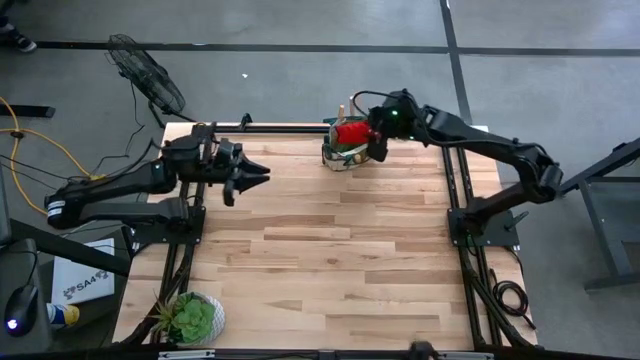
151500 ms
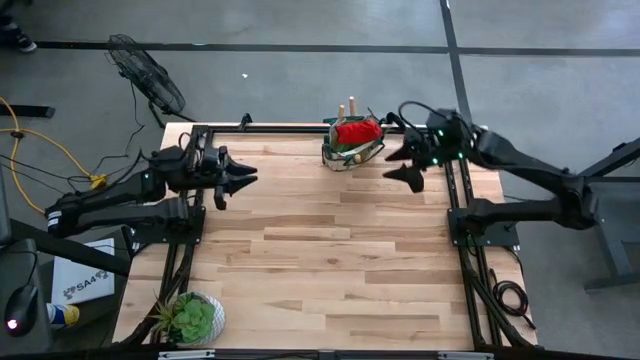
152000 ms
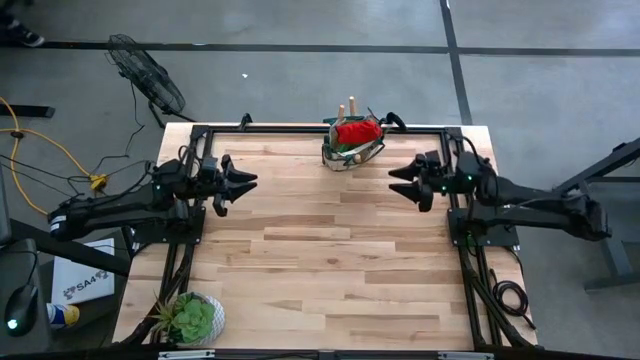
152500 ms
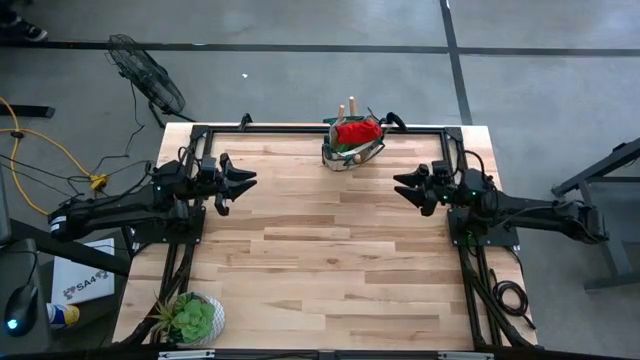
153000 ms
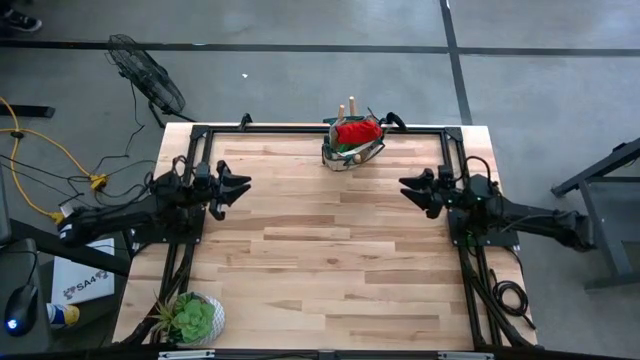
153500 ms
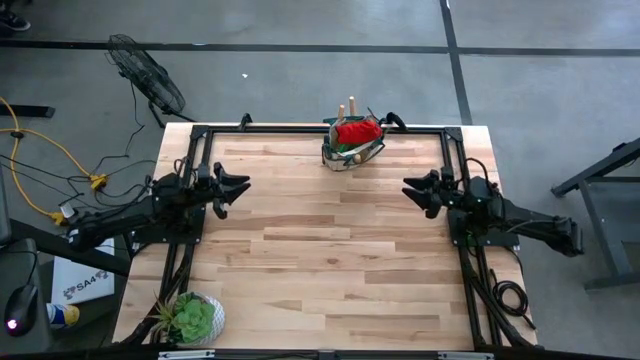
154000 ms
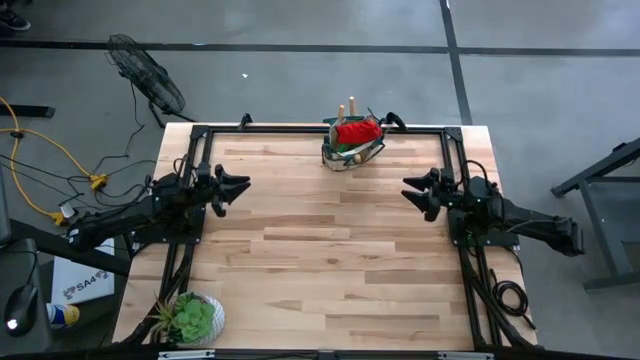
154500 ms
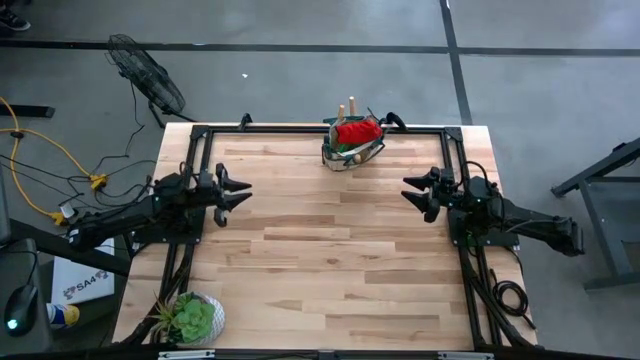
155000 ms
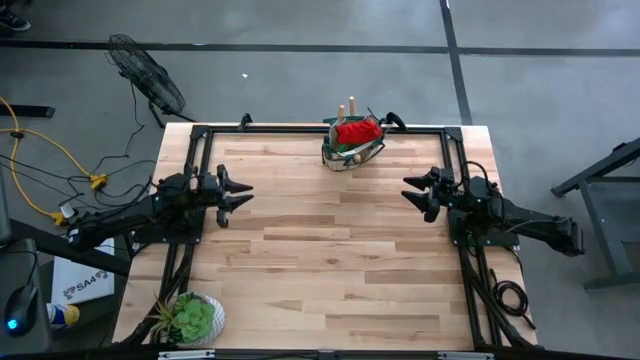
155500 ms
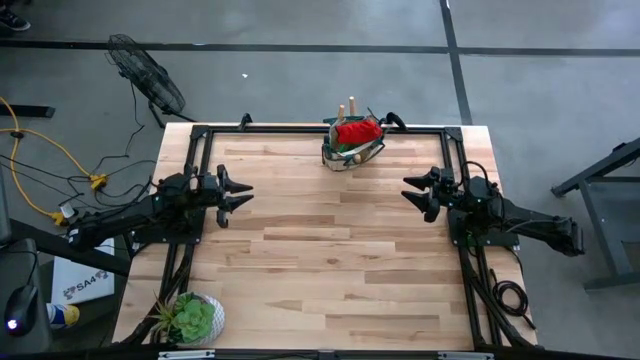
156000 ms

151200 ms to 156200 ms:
Task: Pick & Place Garden tools in Gardening bag
Return to Home Position

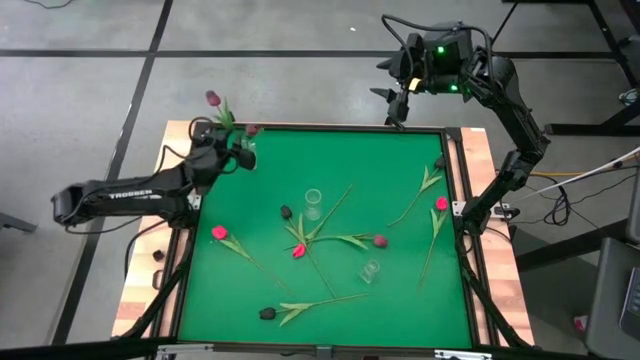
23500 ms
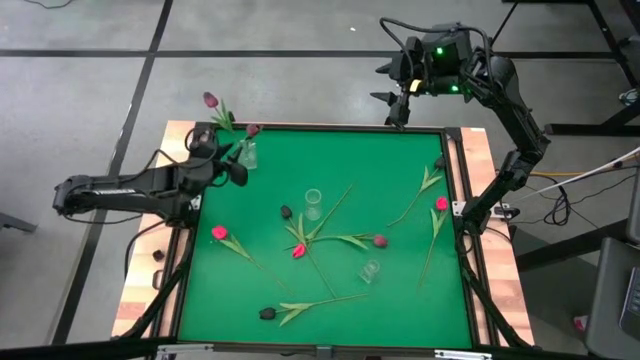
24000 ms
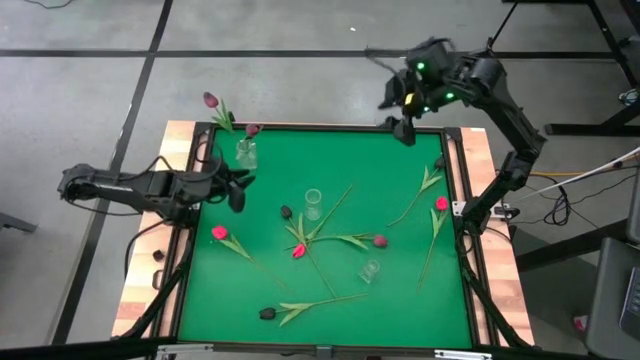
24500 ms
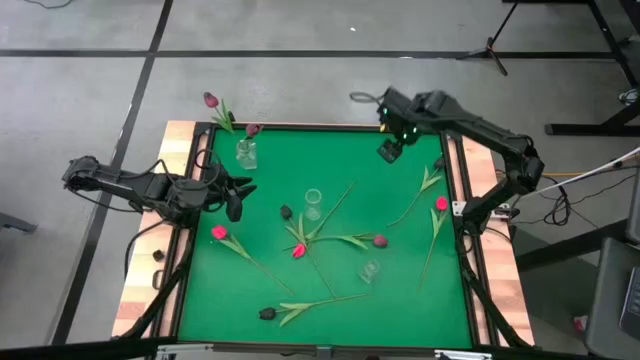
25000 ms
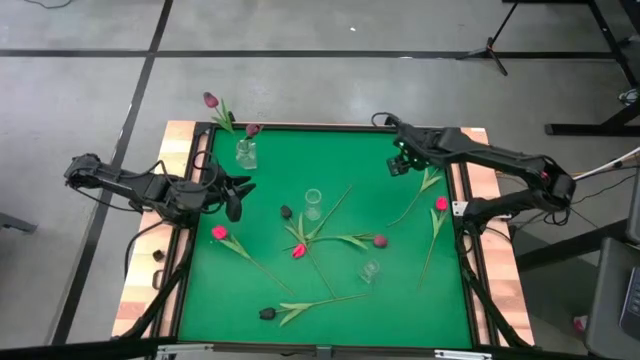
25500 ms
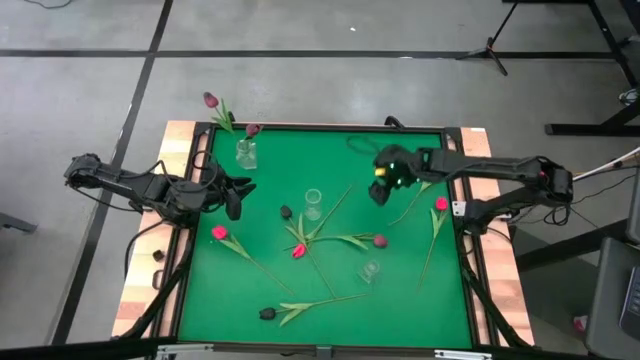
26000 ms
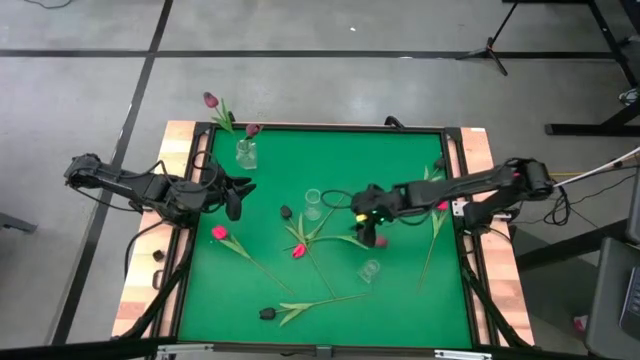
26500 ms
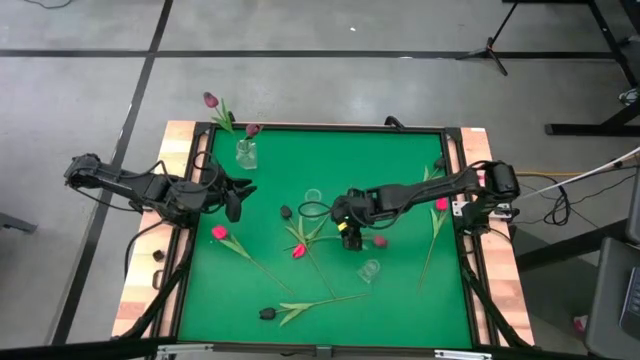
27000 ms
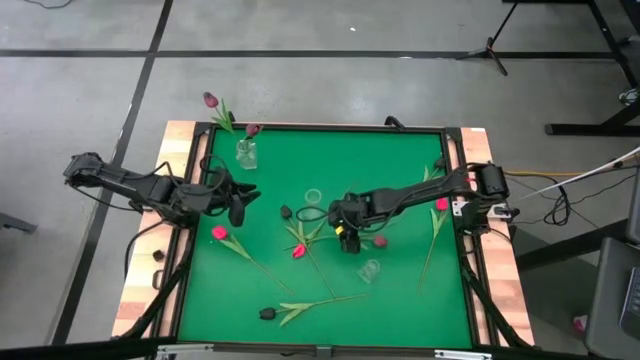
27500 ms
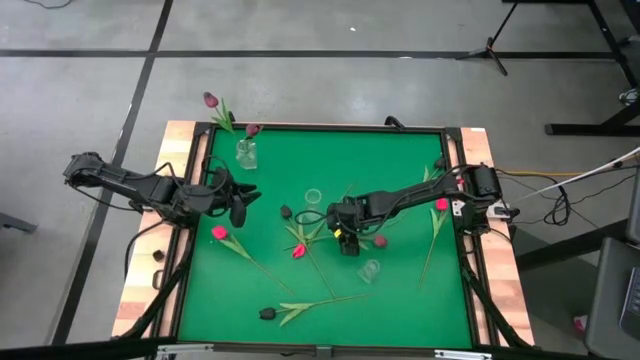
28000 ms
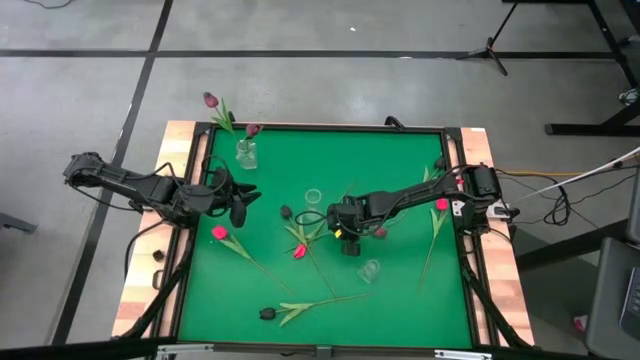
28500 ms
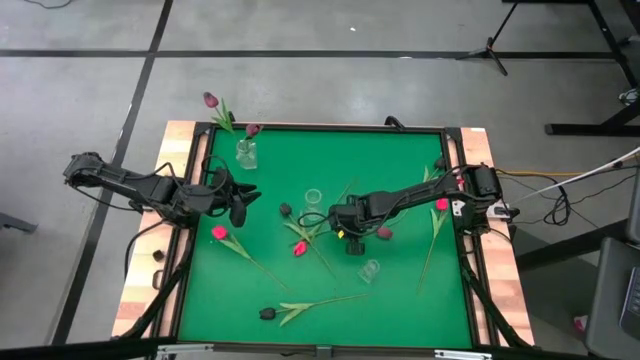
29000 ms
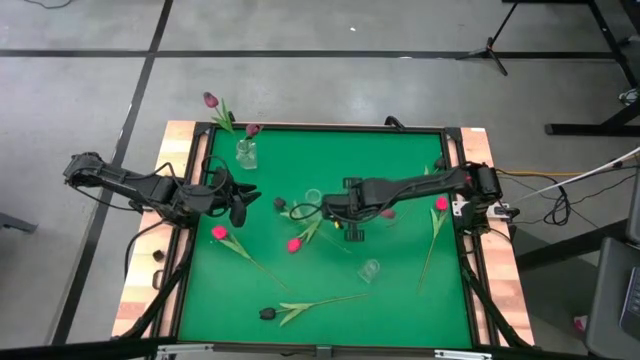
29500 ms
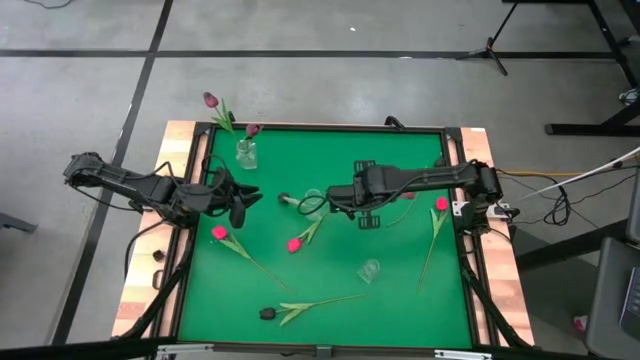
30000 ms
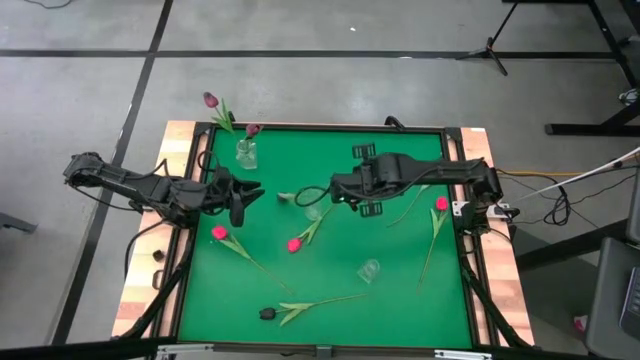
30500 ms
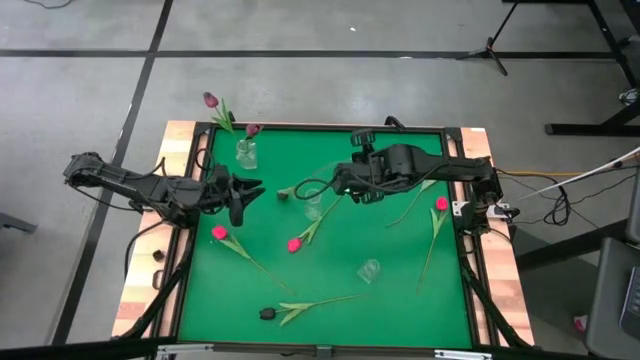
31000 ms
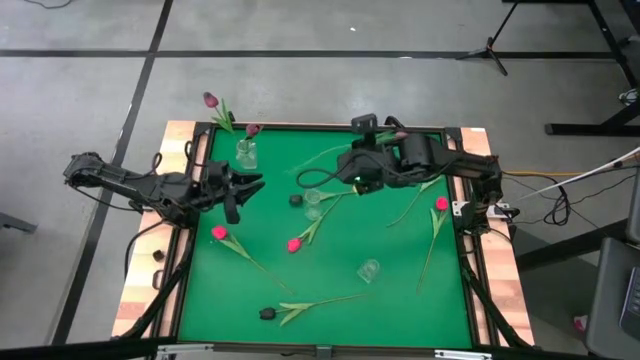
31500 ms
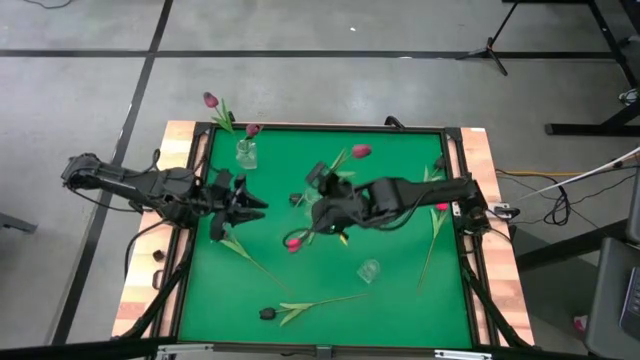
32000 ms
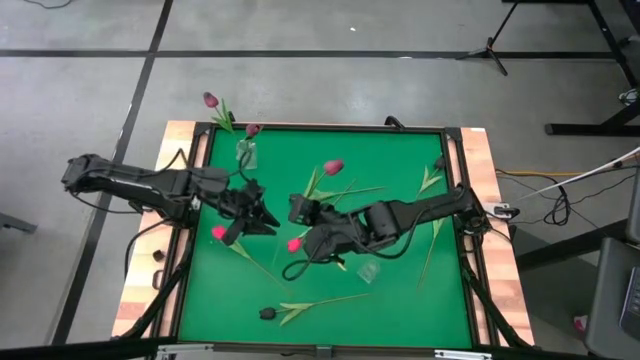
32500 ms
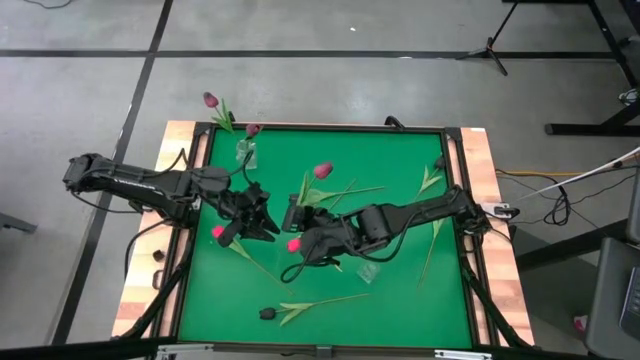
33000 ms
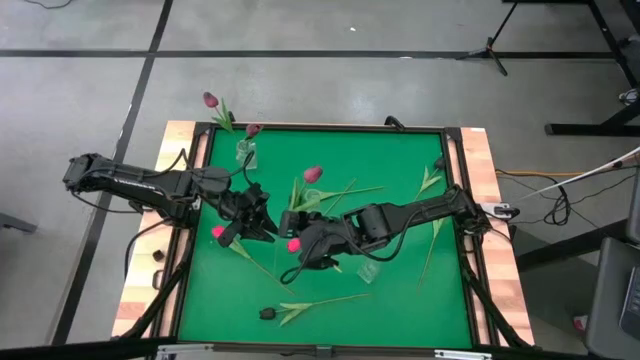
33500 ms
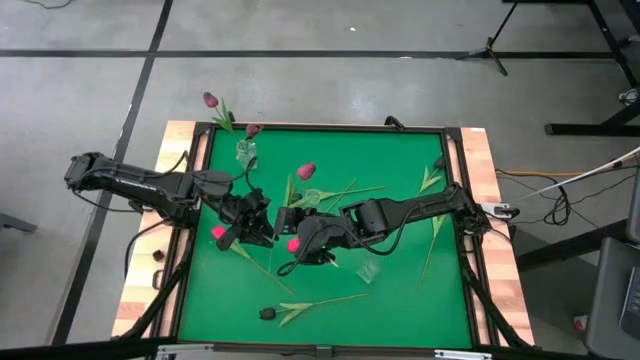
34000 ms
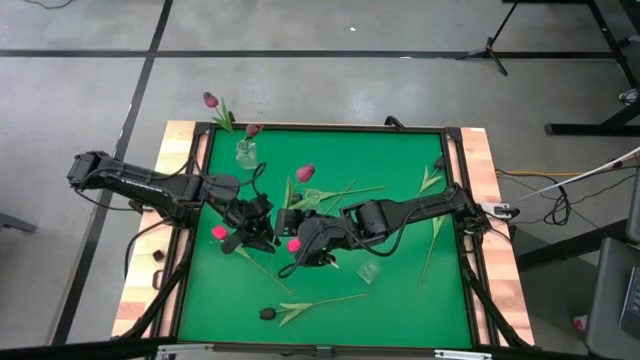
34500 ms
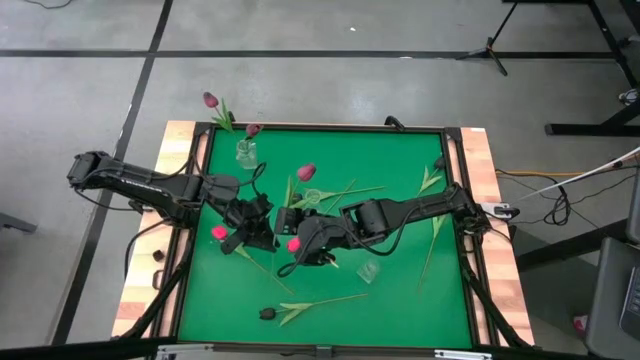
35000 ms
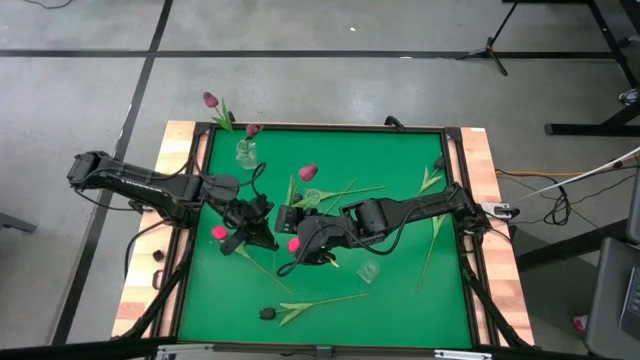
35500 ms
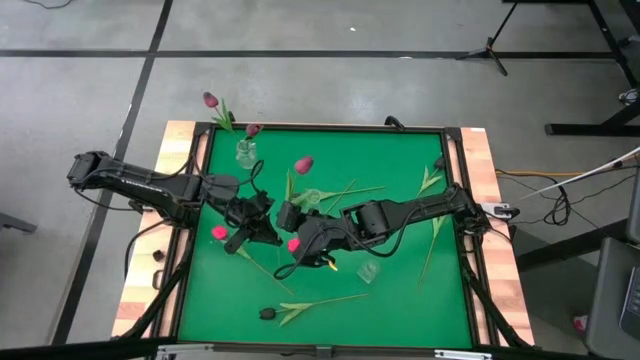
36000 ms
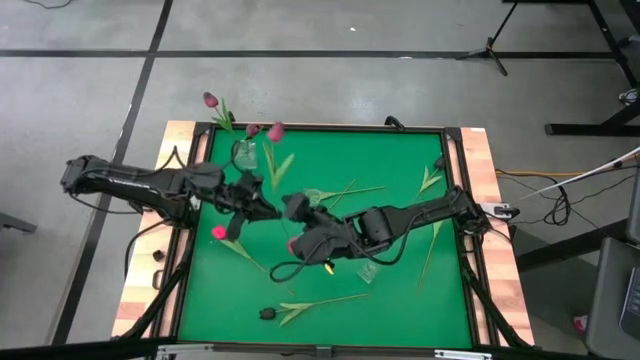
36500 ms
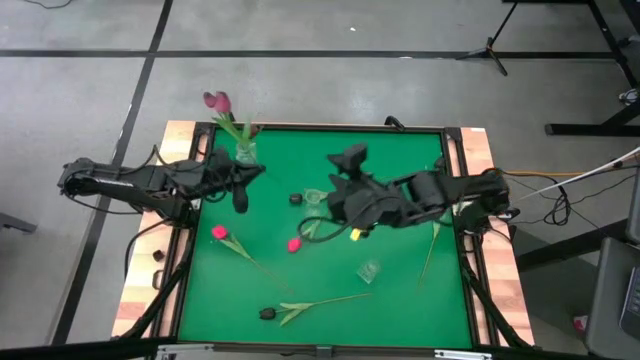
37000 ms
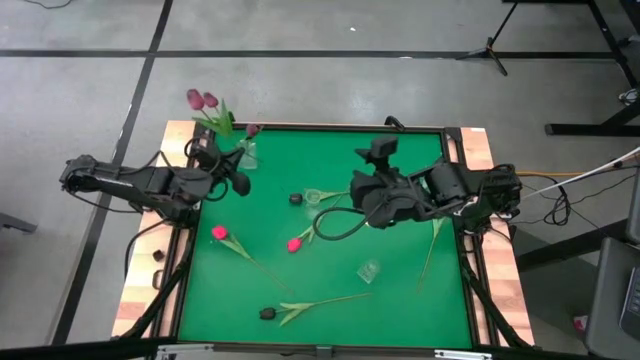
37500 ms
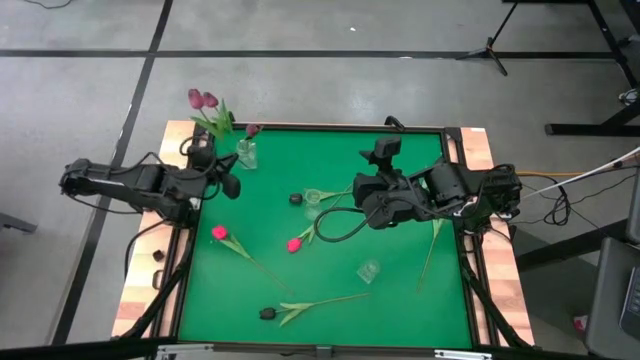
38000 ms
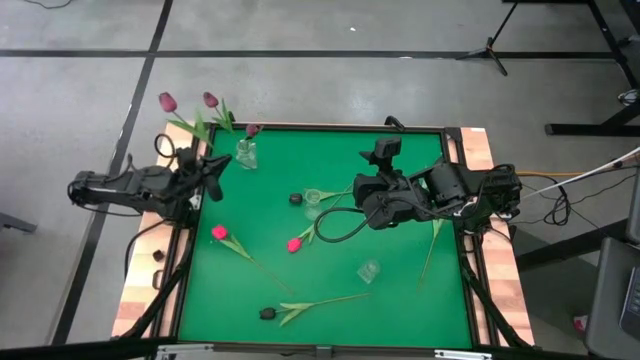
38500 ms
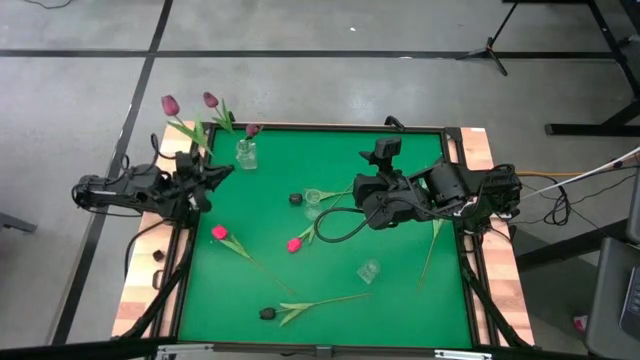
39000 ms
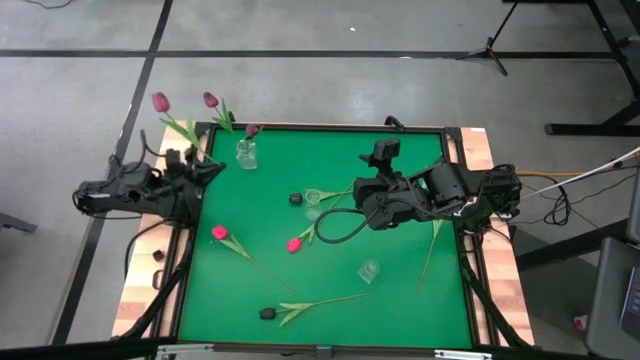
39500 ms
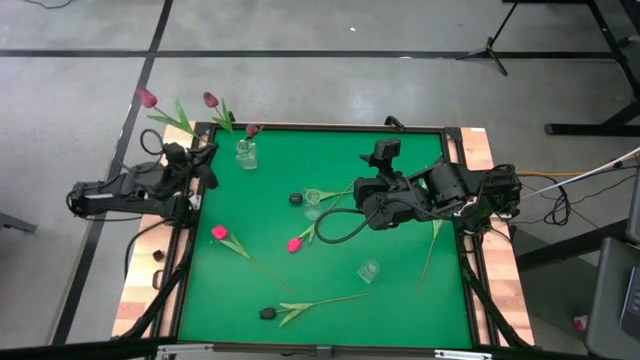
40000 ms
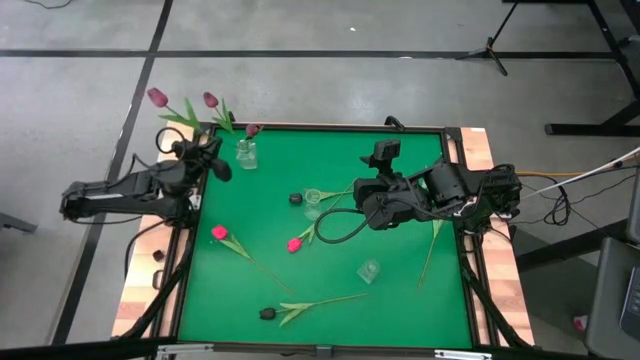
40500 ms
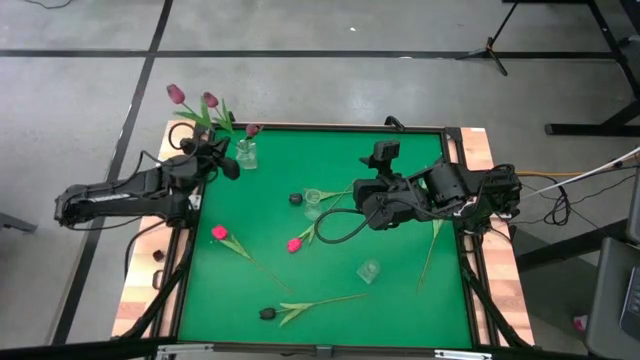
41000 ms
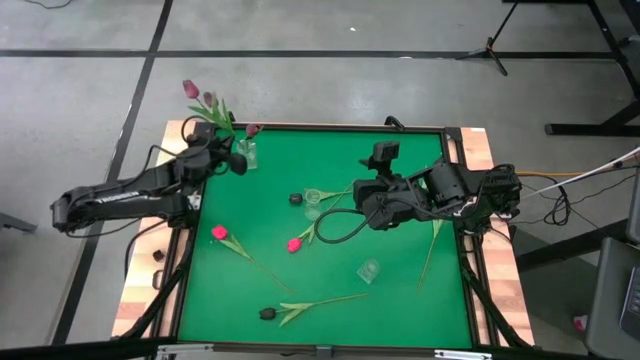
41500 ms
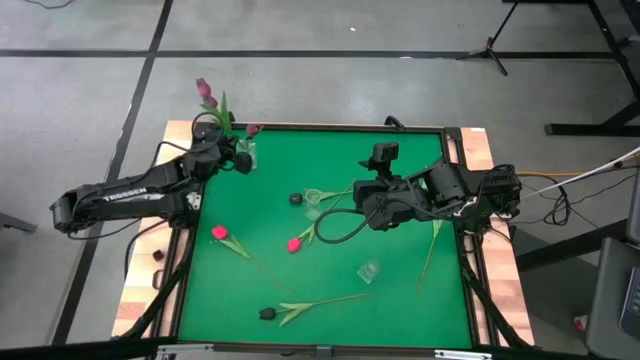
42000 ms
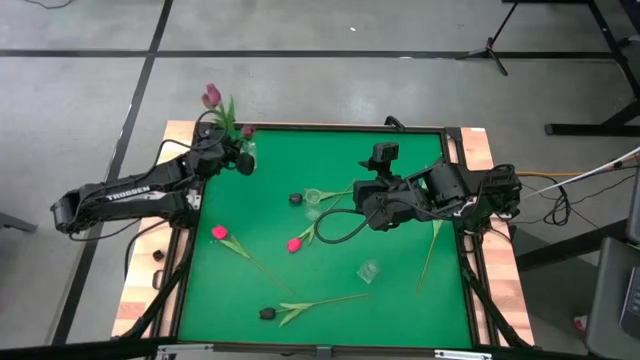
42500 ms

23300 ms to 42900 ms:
Task: Sort flowers into vase by color
Put the dark red tulip into the top transparent vase
